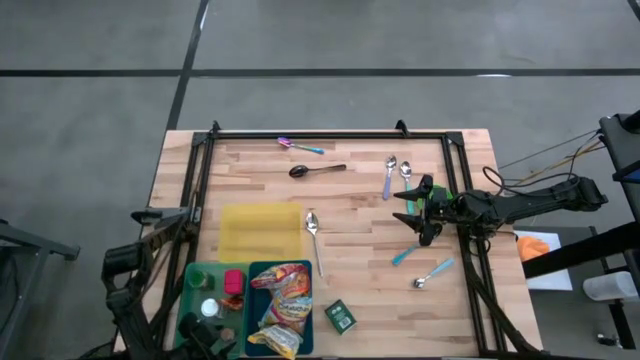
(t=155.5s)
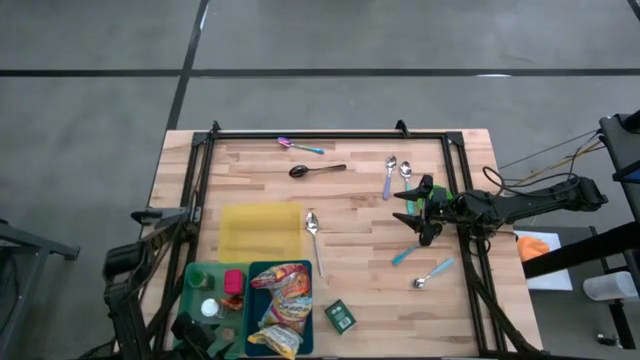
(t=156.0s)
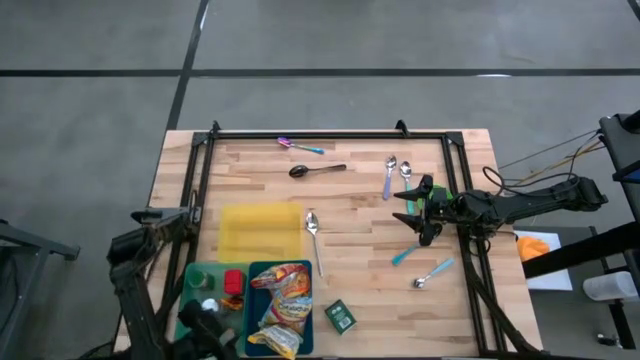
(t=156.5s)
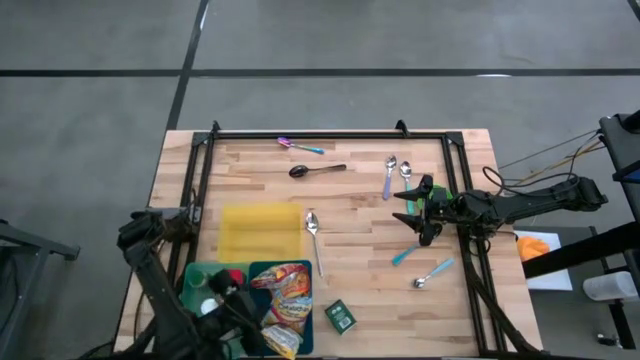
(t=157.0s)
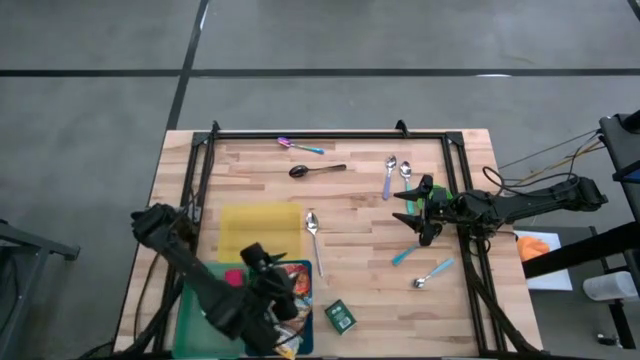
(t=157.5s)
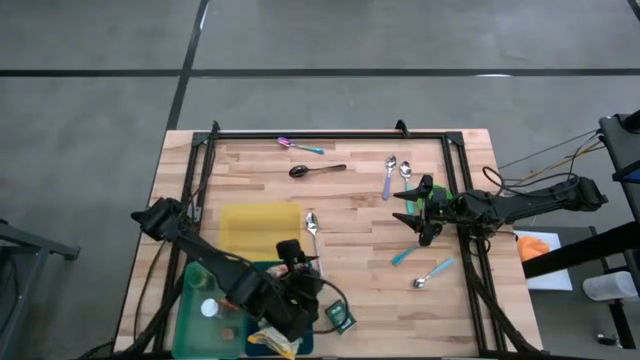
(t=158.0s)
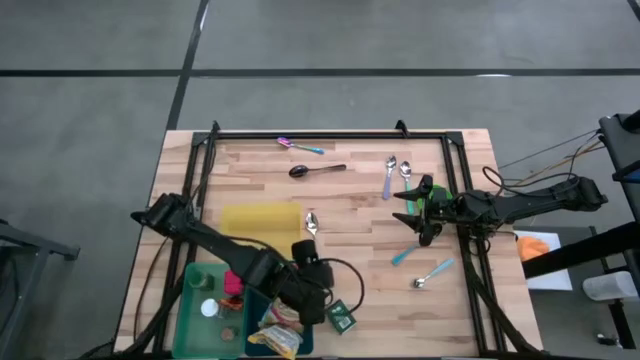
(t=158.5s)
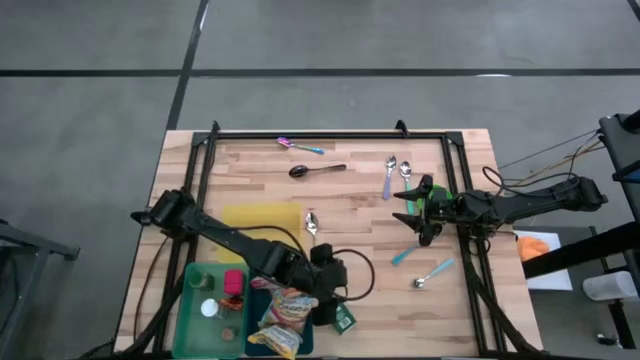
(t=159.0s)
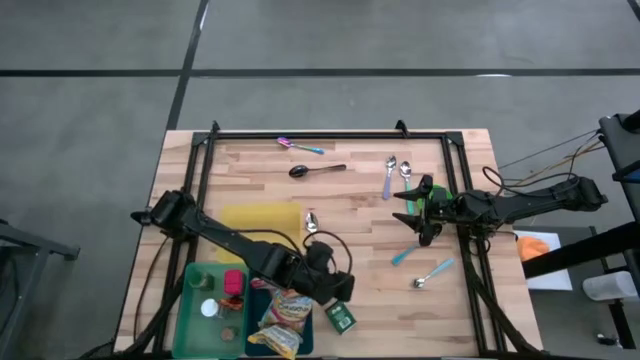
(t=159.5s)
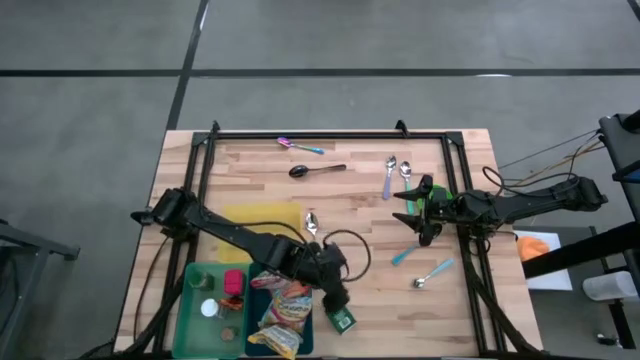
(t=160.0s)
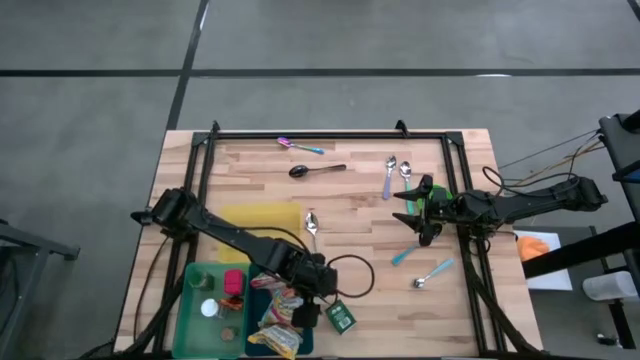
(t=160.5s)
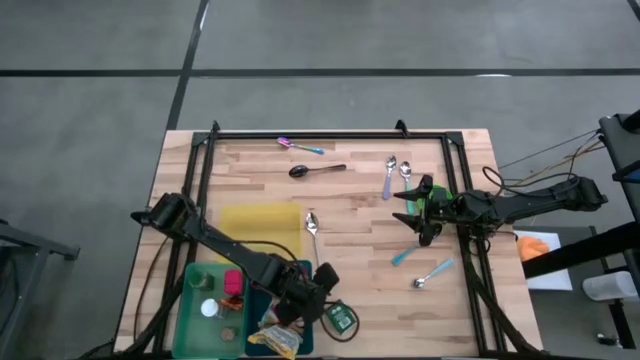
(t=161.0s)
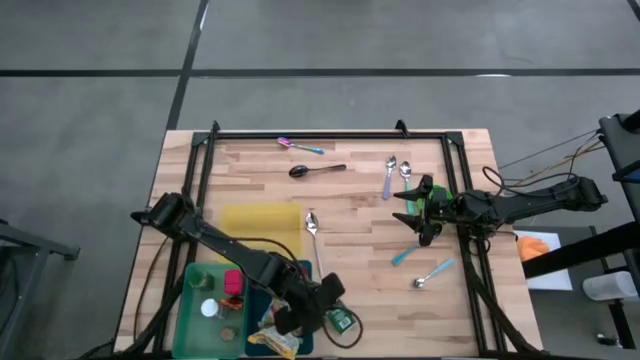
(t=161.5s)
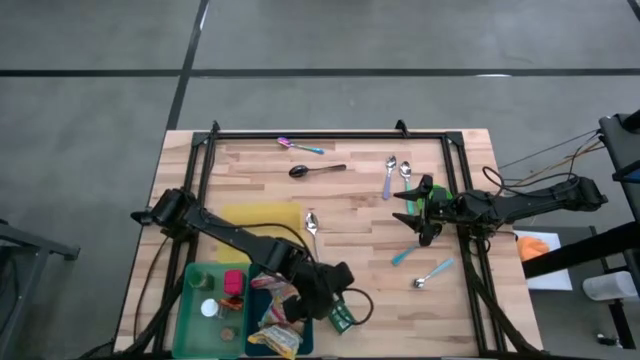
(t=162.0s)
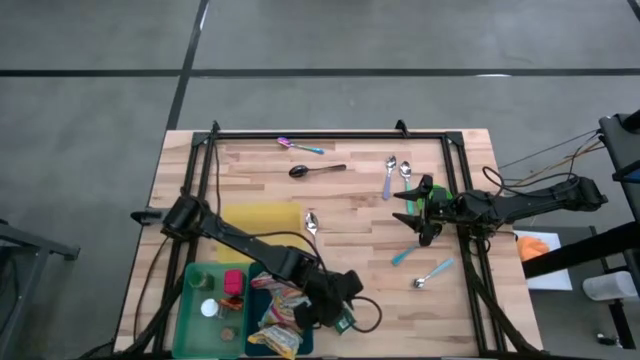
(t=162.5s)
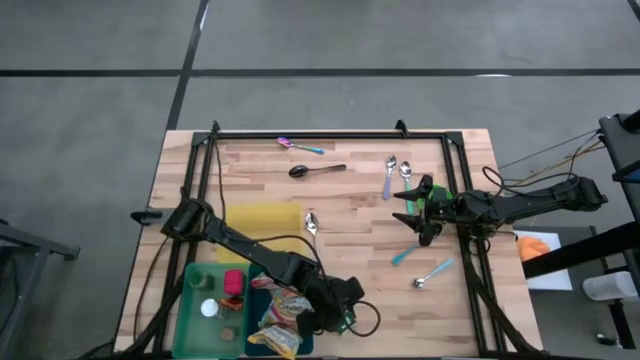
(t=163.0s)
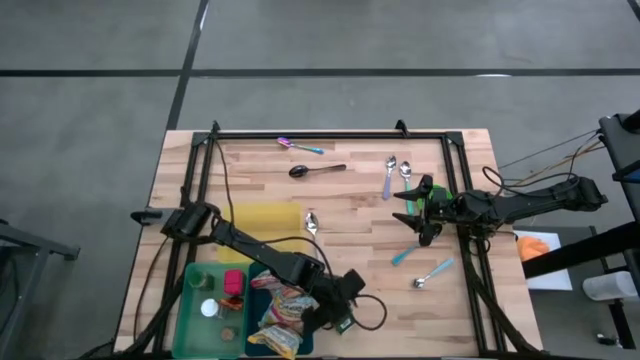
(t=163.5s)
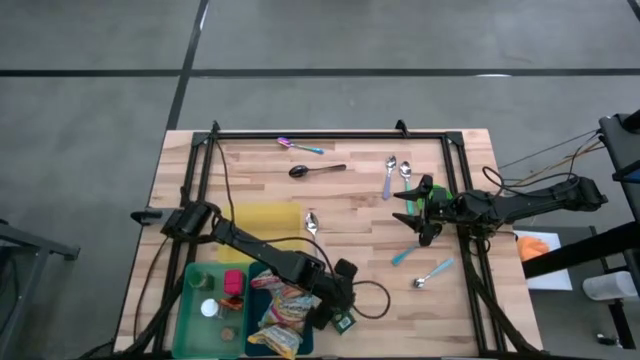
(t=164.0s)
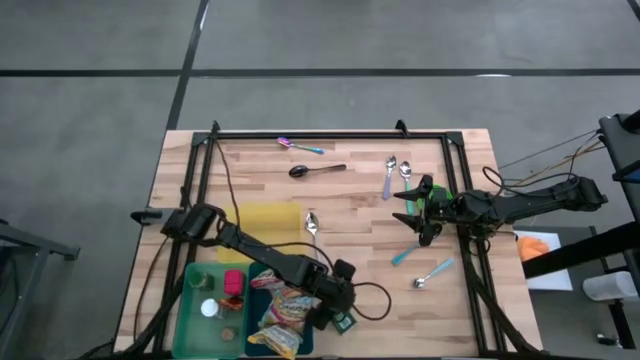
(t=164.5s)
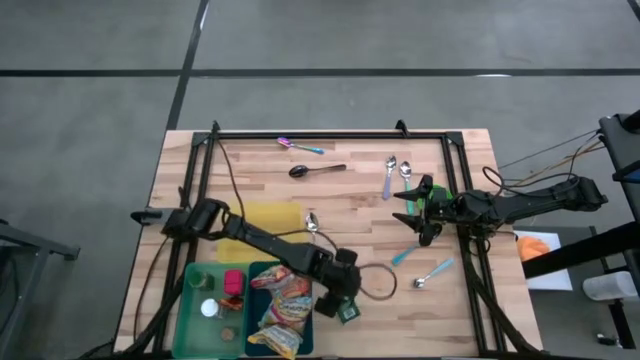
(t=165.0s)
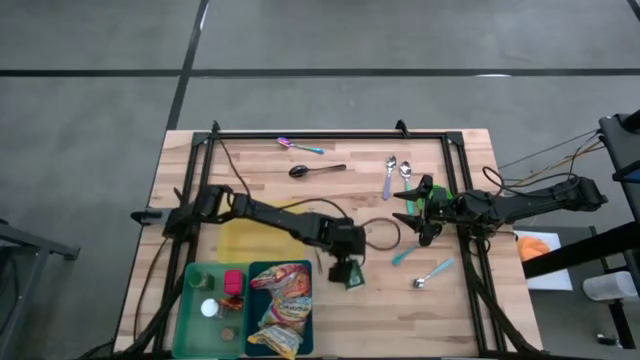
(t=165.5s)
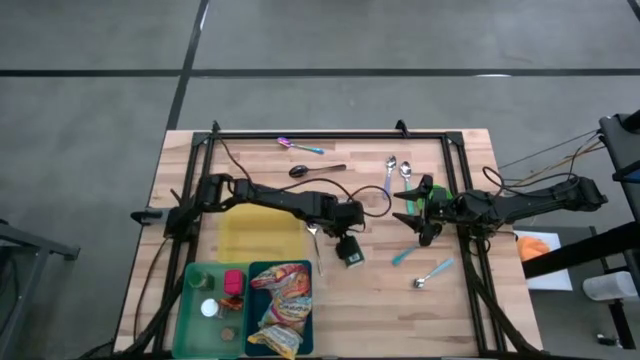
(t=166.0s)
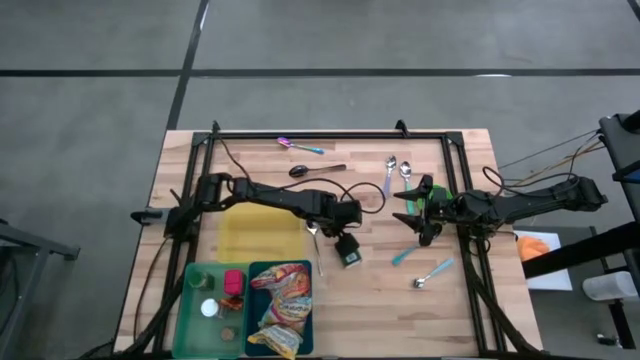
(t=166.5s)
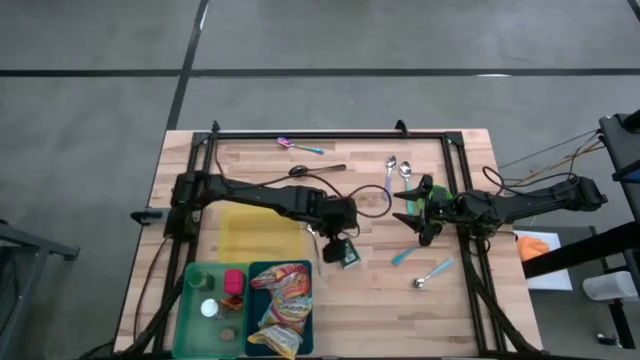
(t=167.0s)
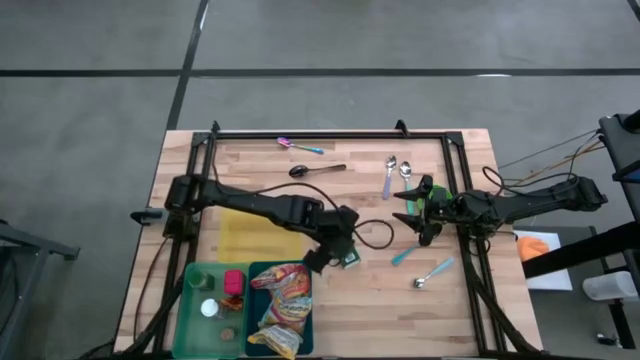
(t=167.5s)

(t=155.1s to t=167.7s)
Put the black spice can into the green bin

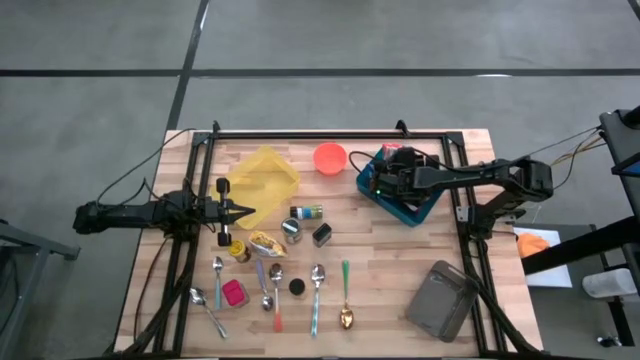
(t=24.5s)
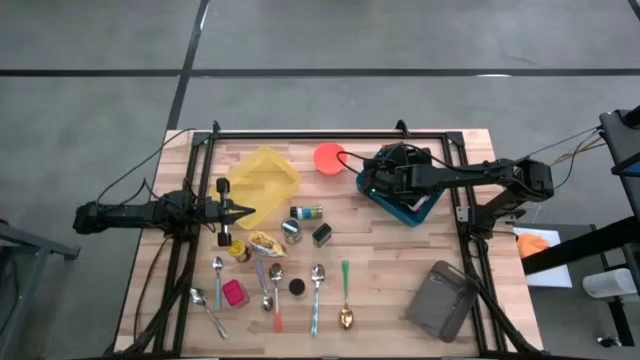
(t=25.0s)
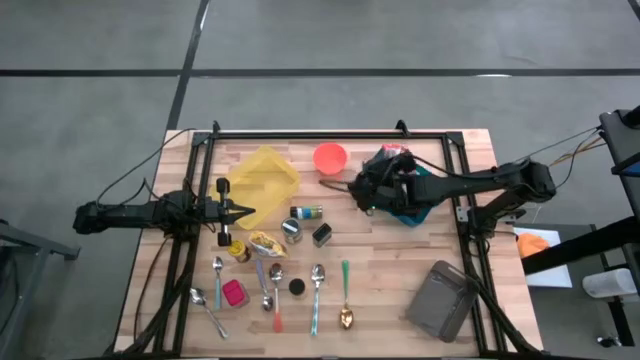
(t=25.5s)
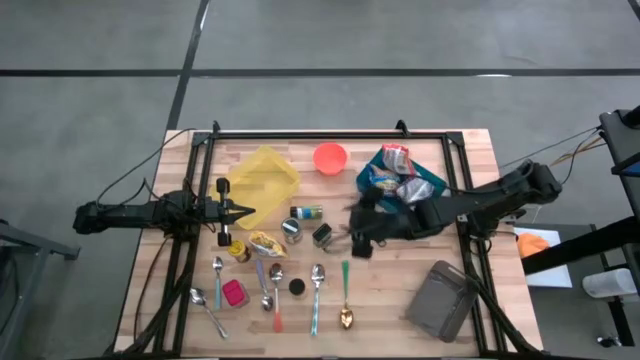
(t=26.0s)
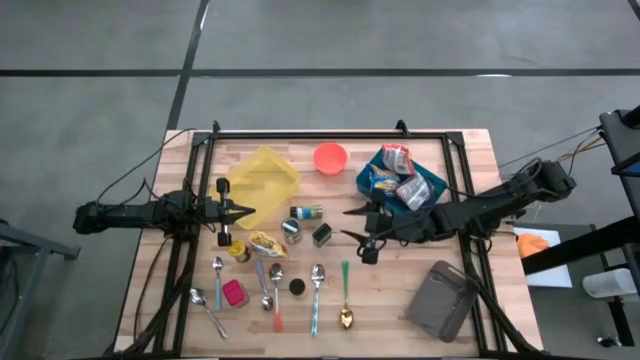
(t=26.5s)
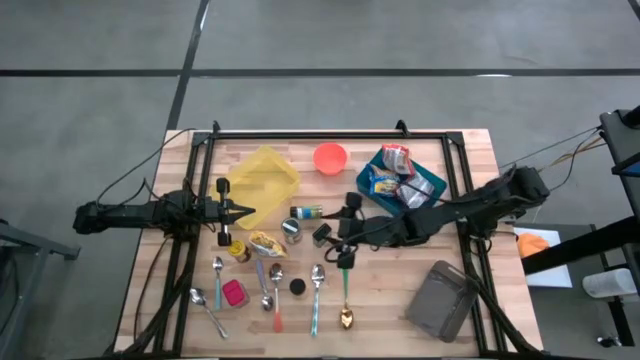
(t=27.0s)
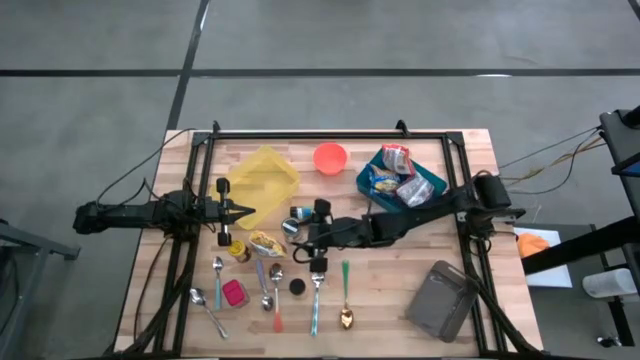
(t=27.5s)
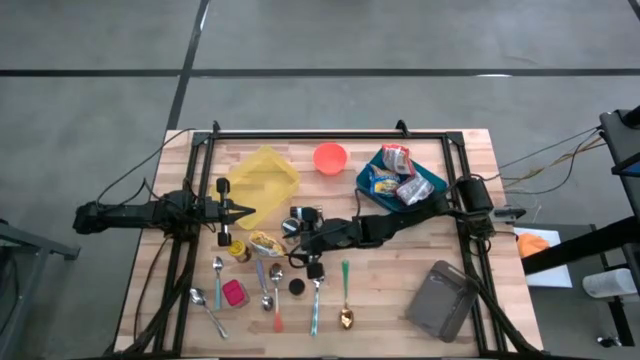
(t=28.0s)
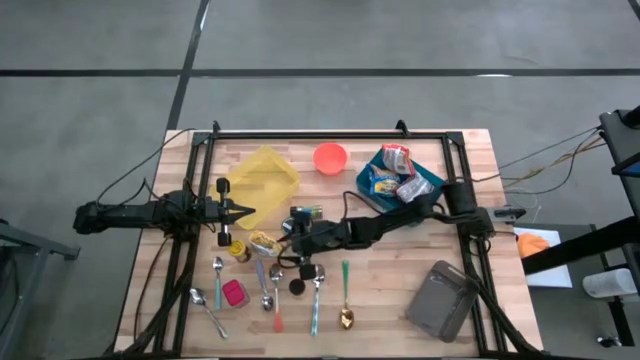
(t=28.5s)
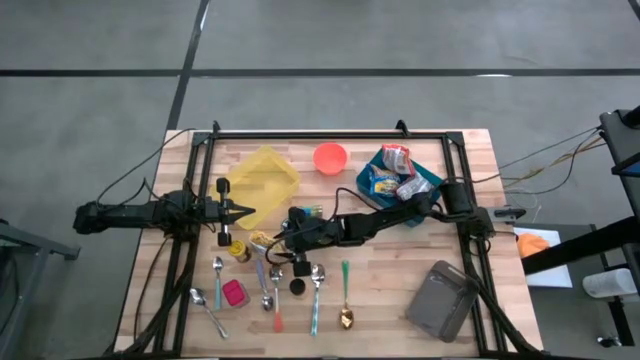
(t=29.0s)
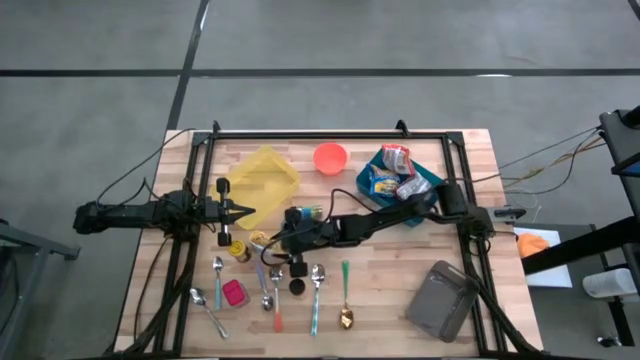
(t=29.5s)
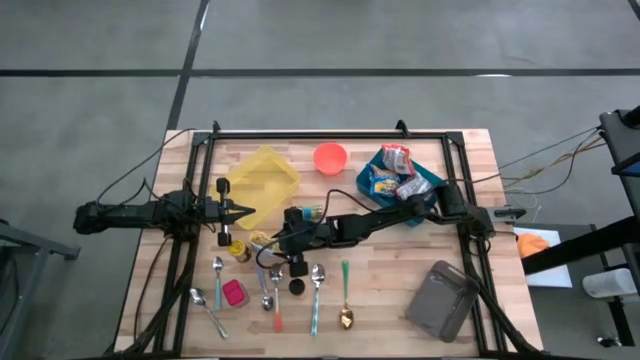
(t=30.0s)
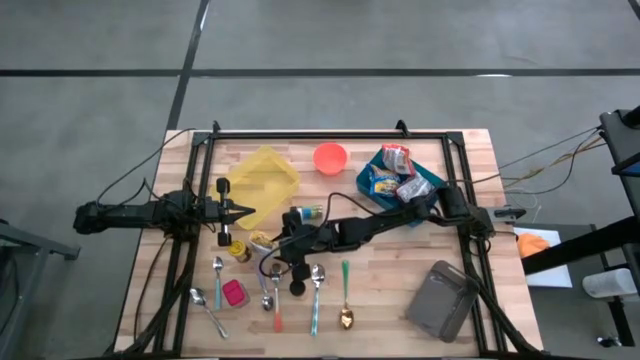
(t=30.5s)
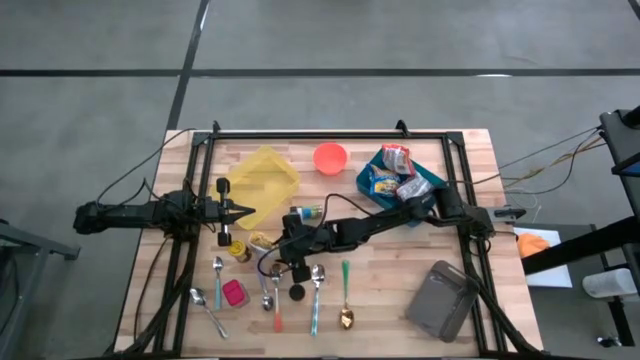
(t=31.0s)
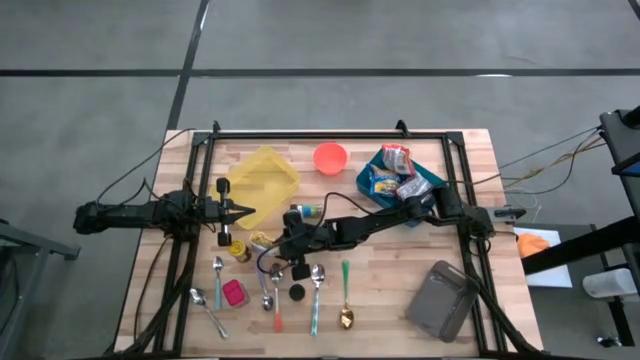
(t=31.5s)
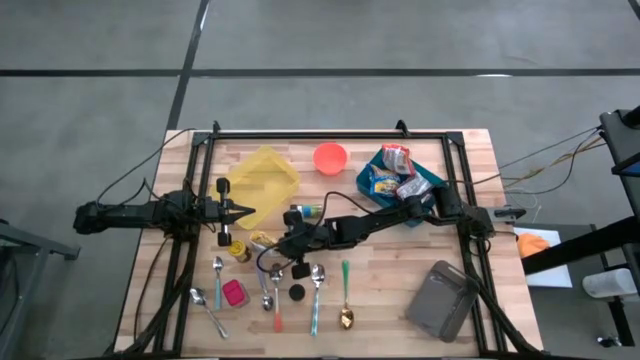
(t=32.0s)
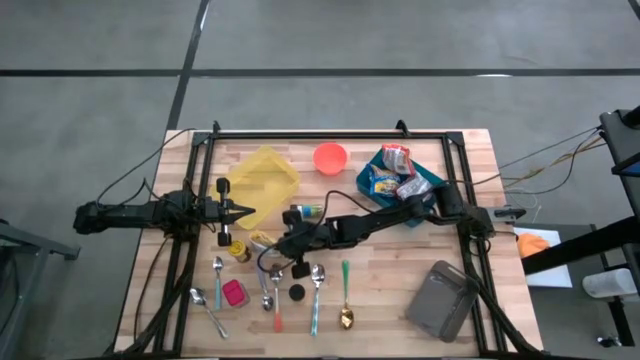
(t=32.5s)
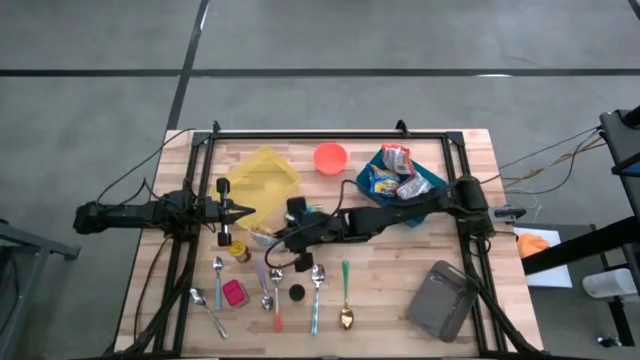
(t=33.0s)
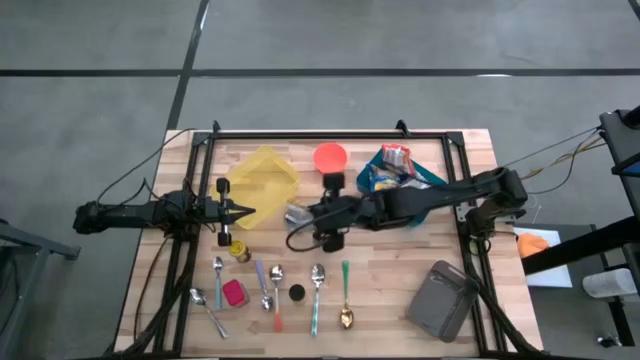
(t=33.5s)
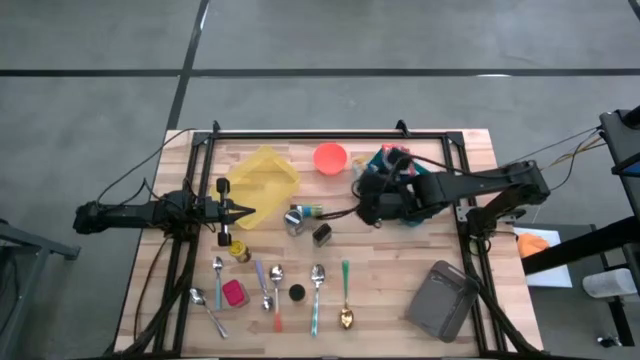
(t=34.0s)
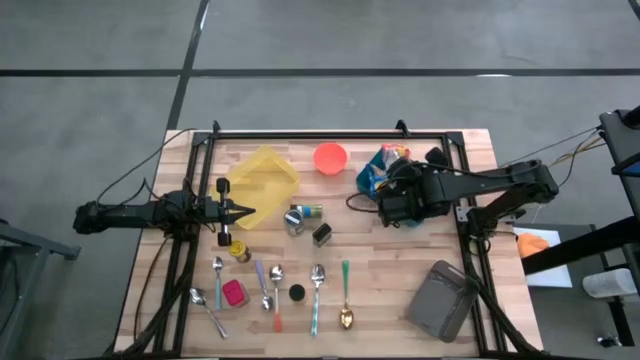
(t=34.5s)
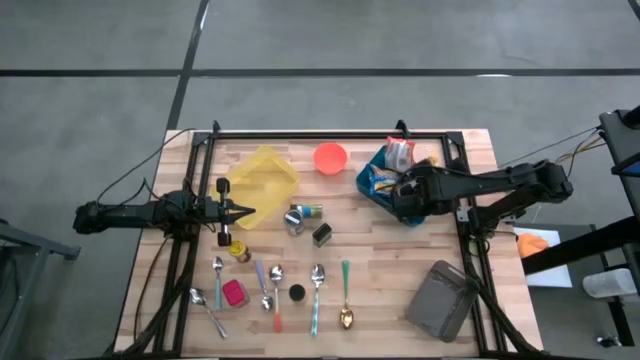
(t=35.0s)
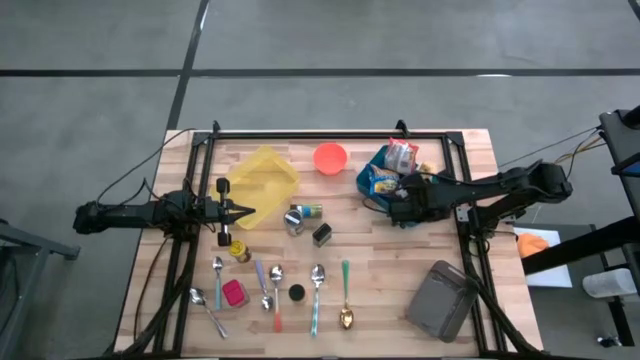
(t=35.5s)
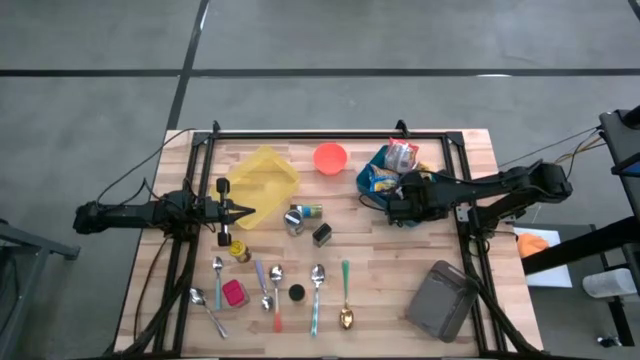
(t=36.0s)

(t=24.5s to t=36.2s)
Put the yellow noodle pack into the blue bin
